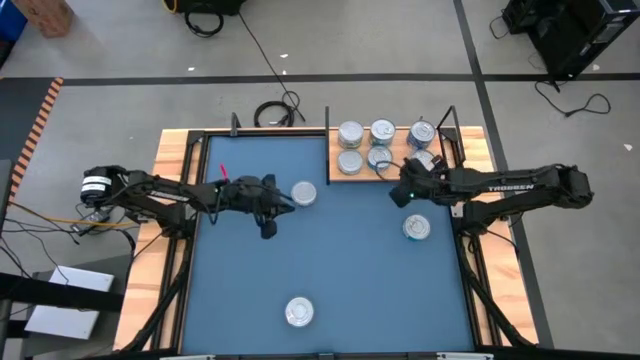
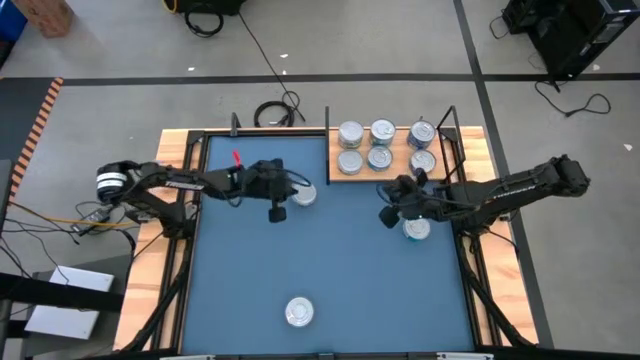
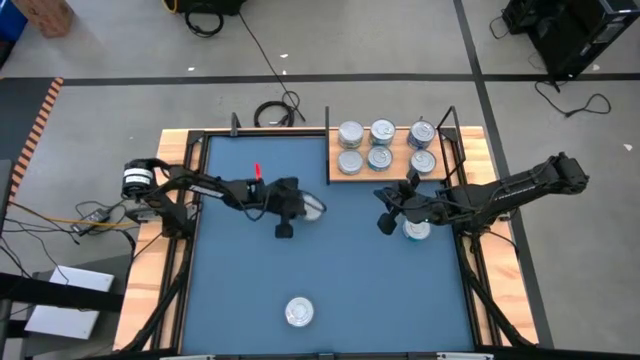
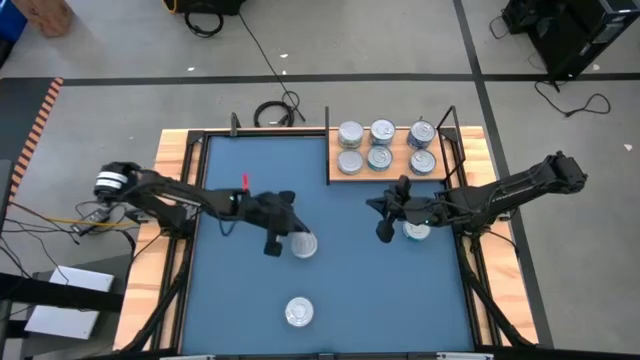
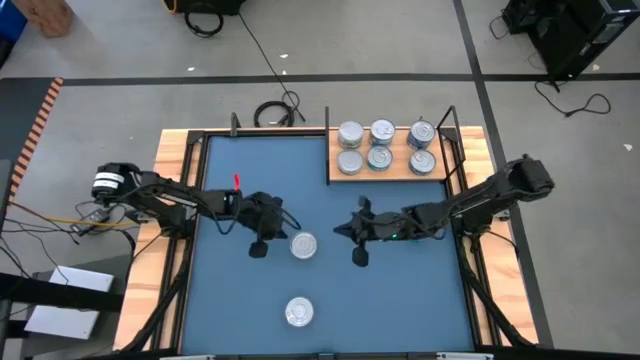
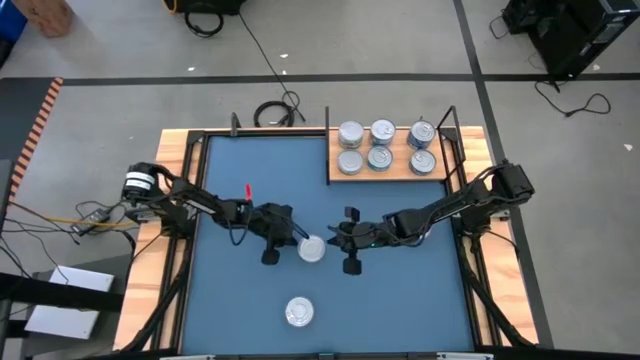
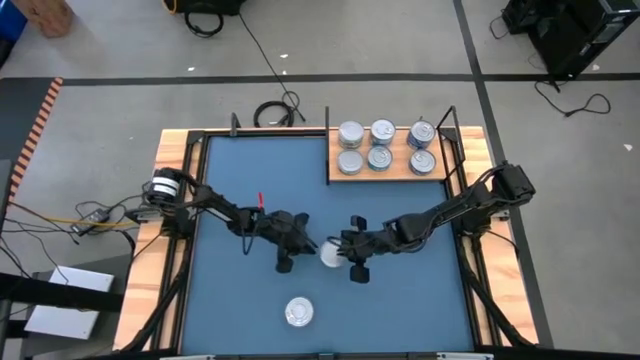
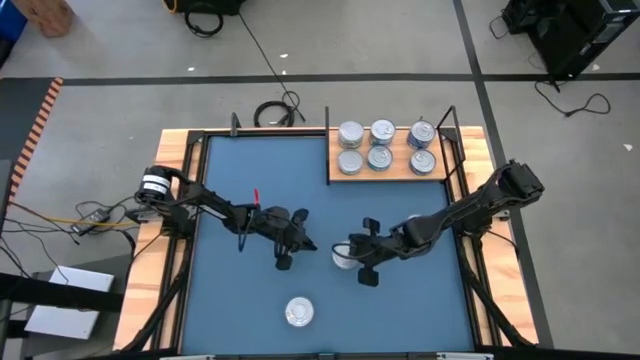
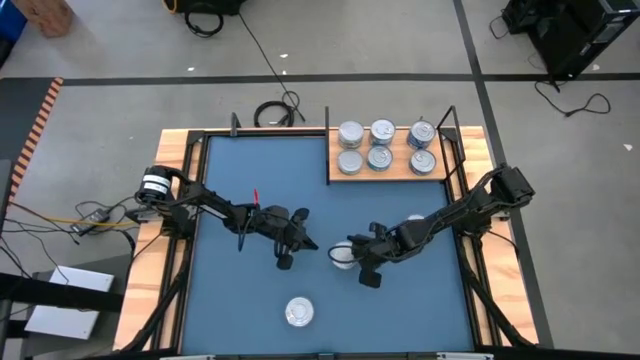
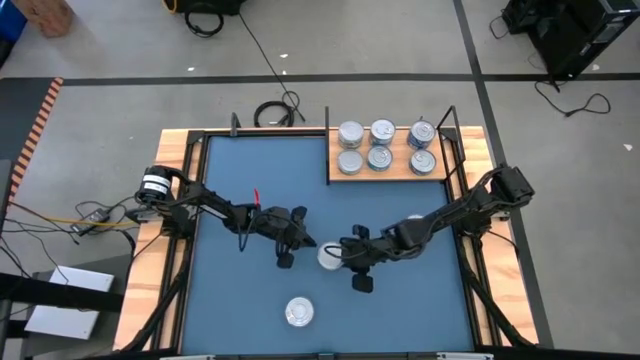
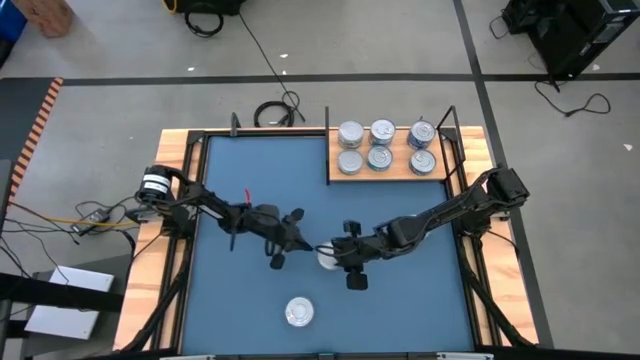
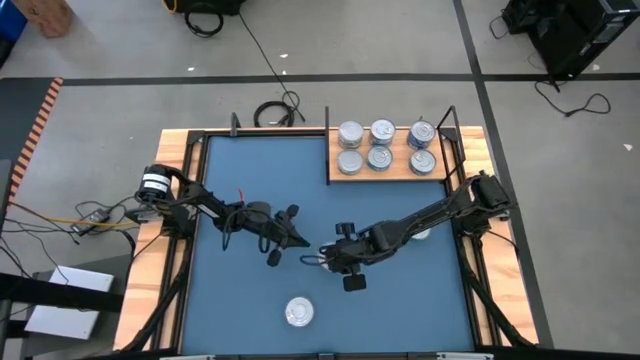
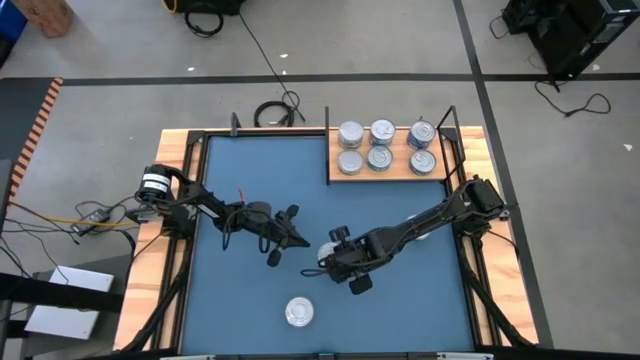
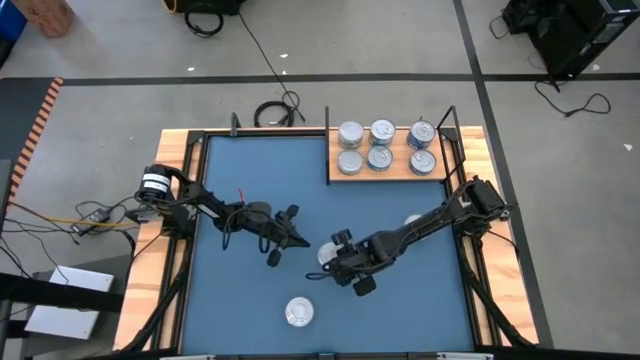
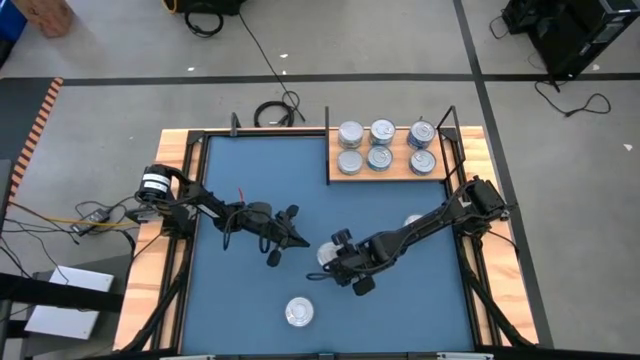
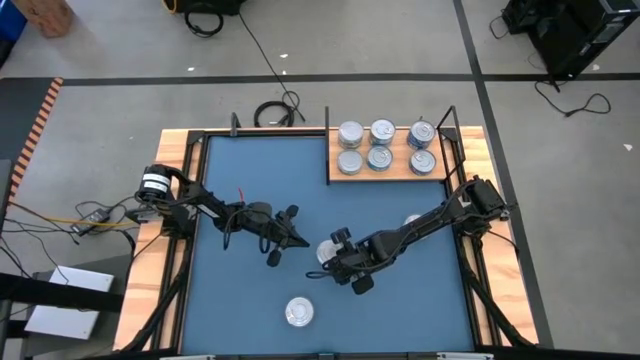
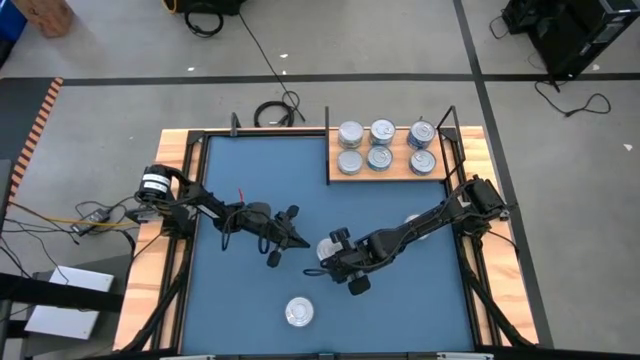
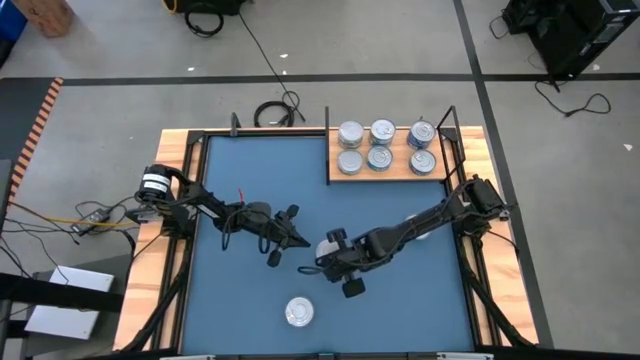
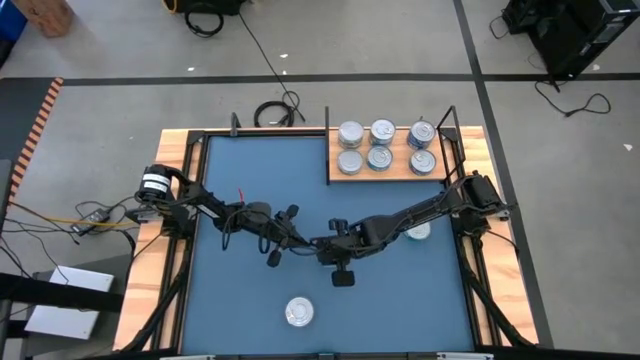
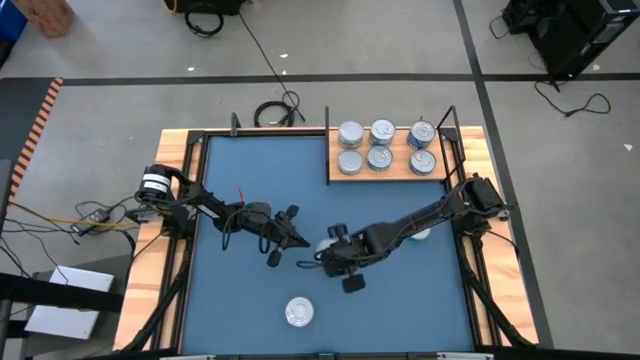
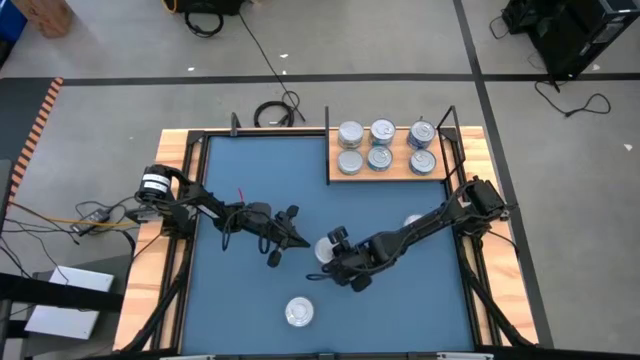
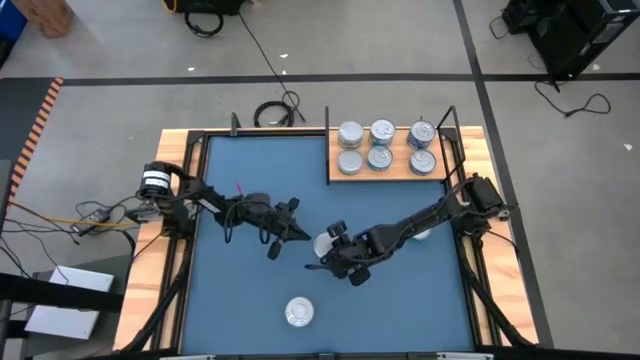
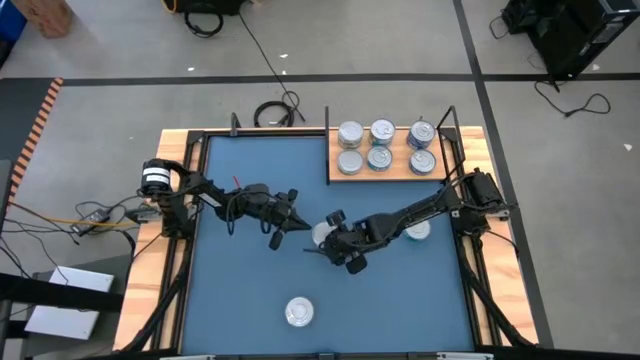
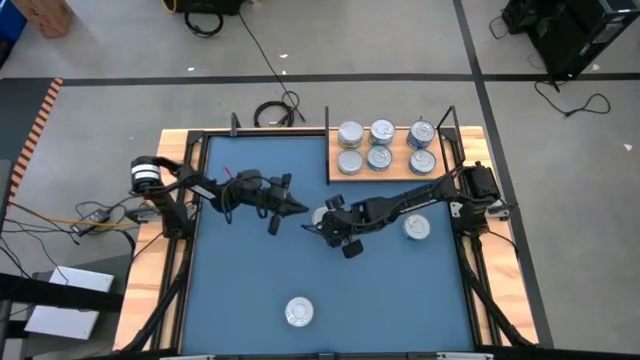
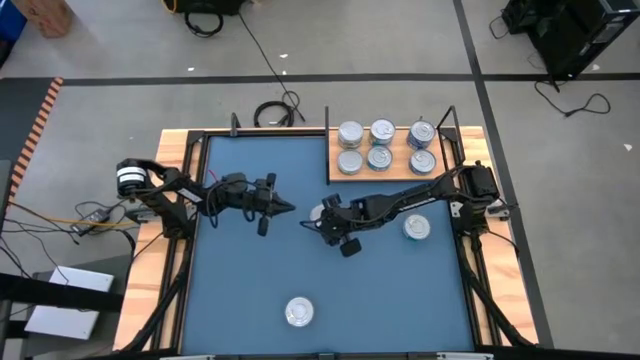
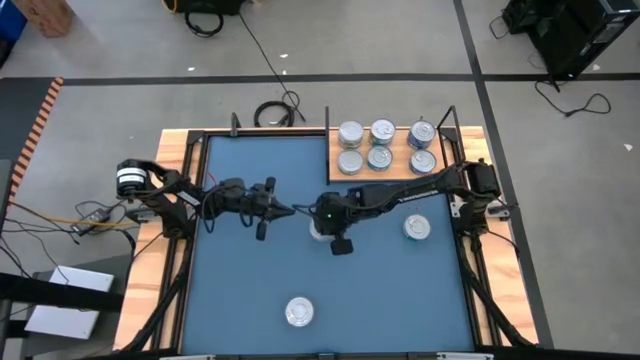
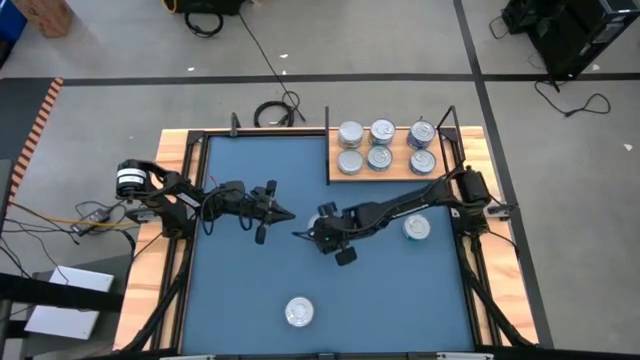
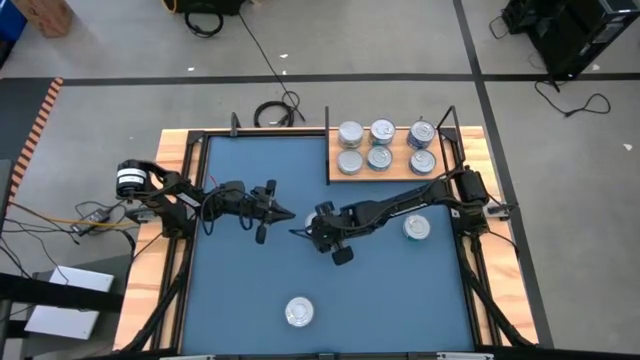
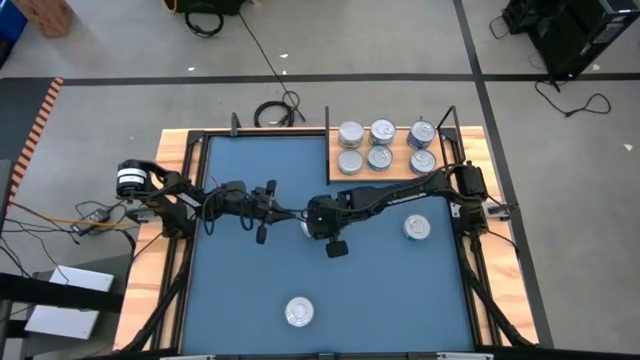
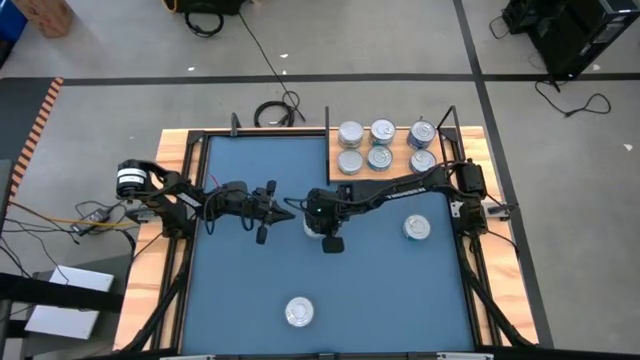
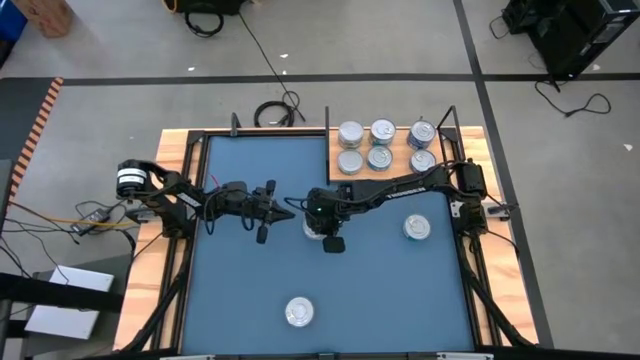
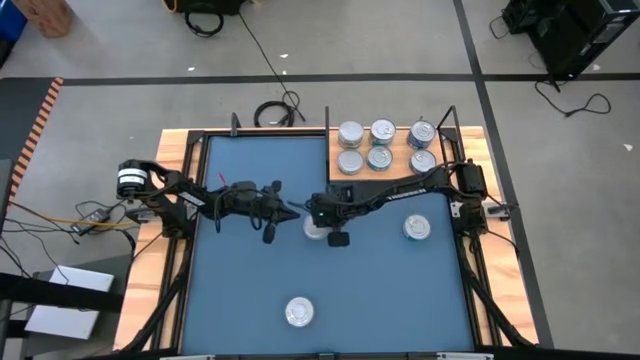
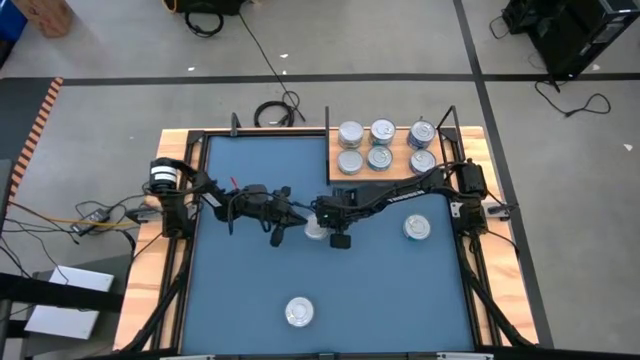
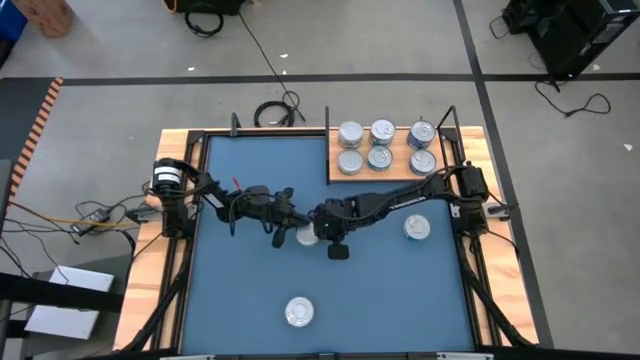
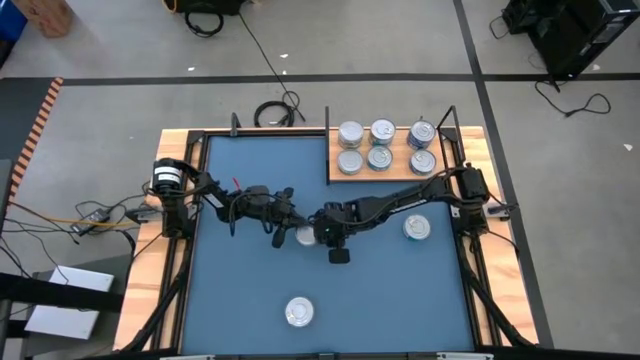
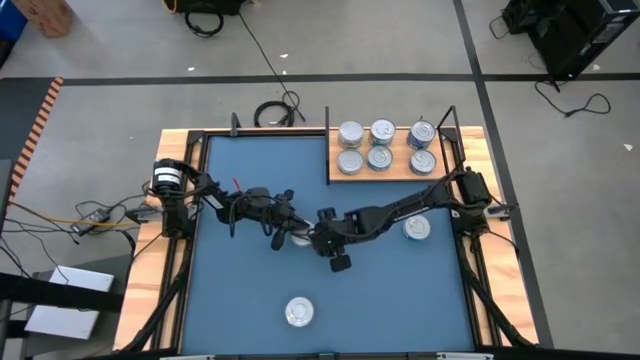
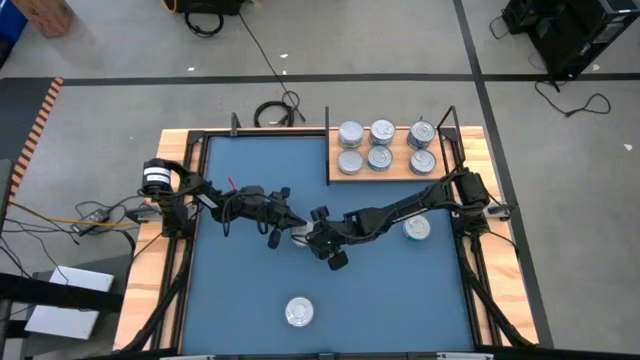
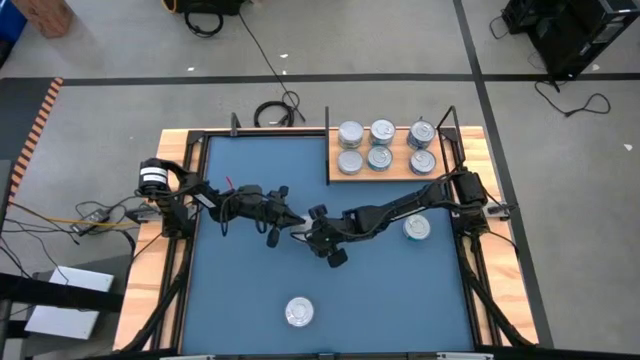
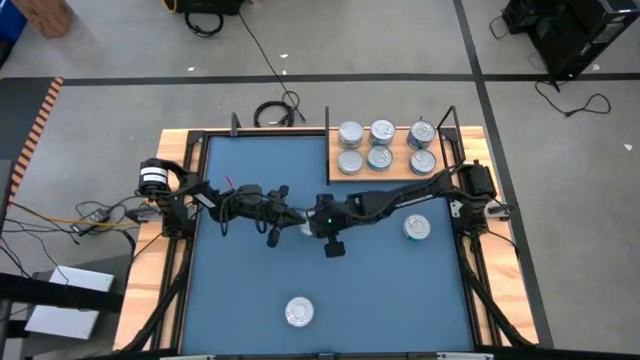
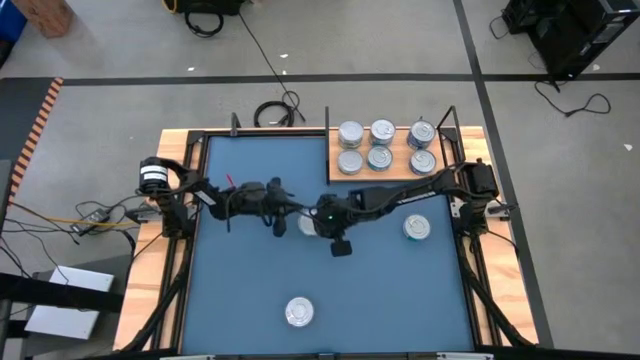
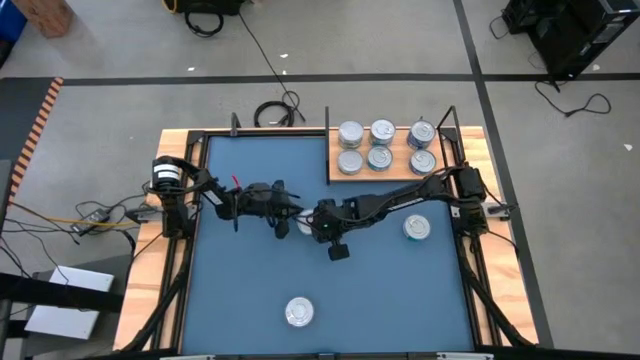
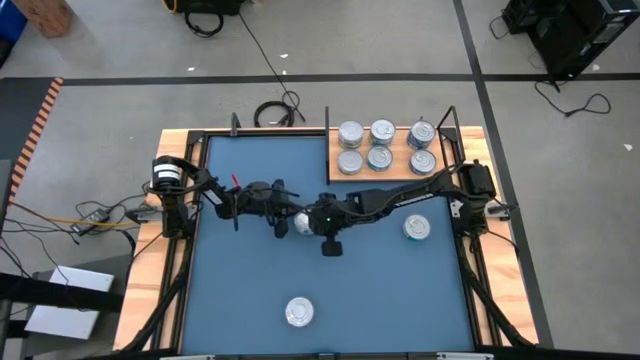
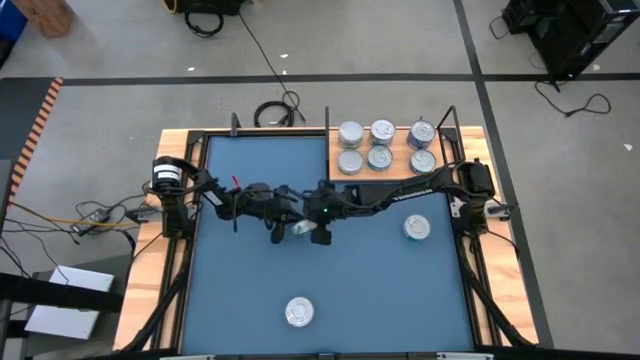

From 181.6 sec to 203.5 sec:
Task: Stack canned seafood by type on shelf
Stack the green tuna can on to the green tuna can on the shelf aligned with the other green tuna can
